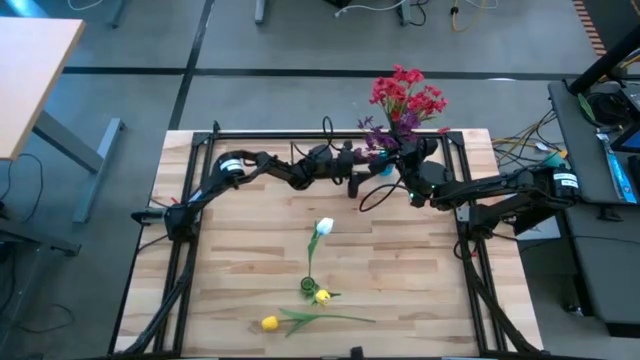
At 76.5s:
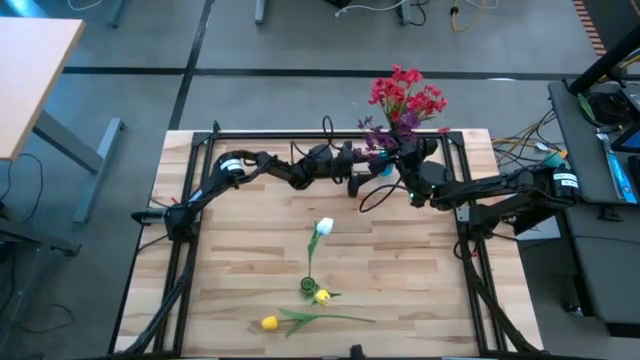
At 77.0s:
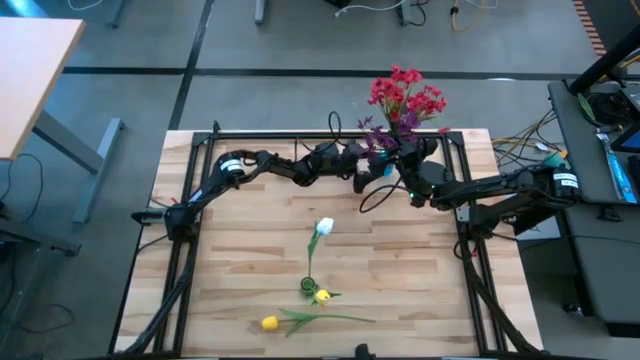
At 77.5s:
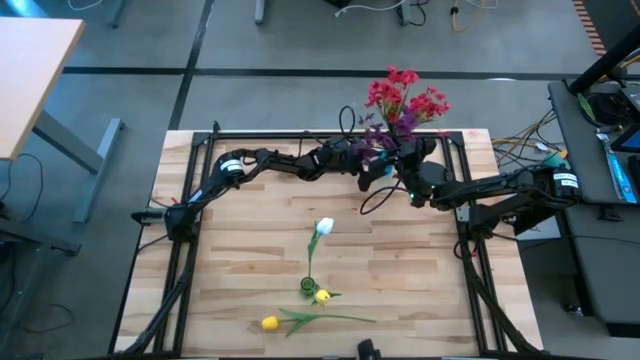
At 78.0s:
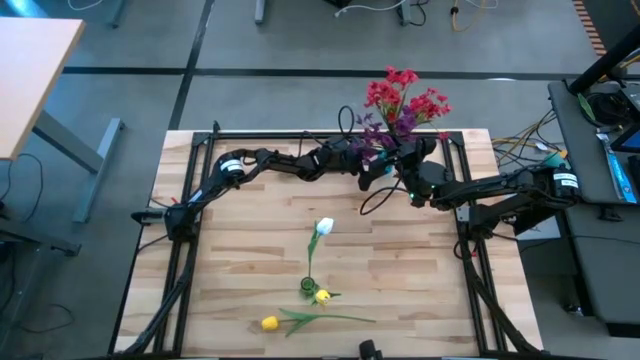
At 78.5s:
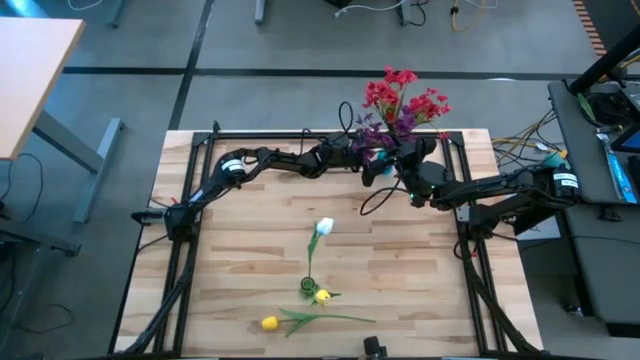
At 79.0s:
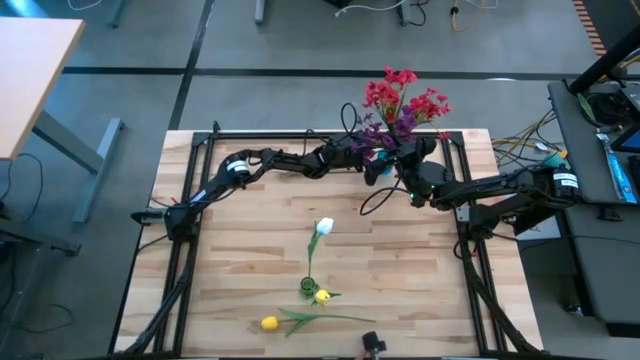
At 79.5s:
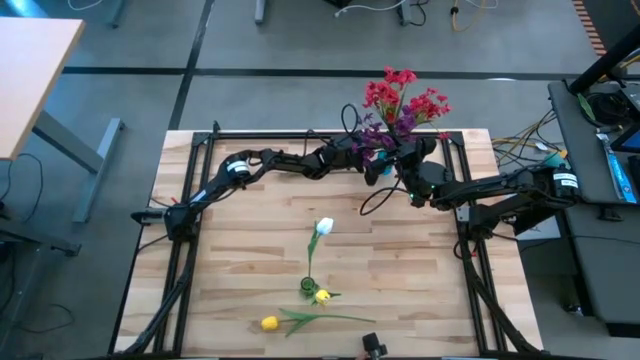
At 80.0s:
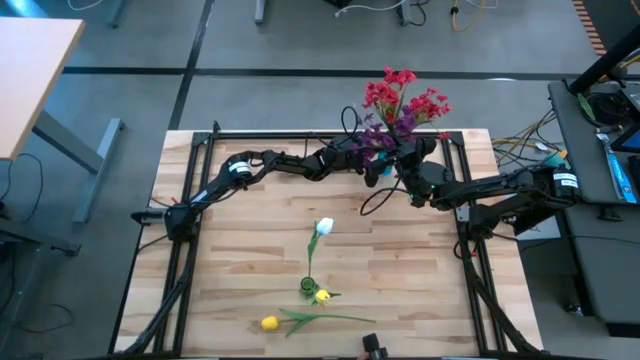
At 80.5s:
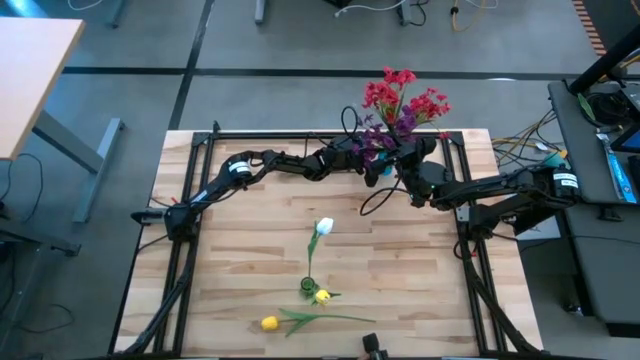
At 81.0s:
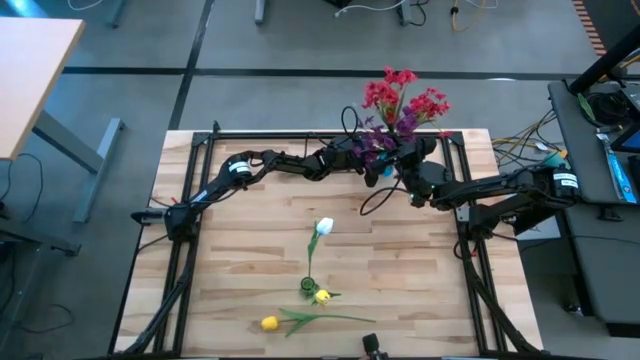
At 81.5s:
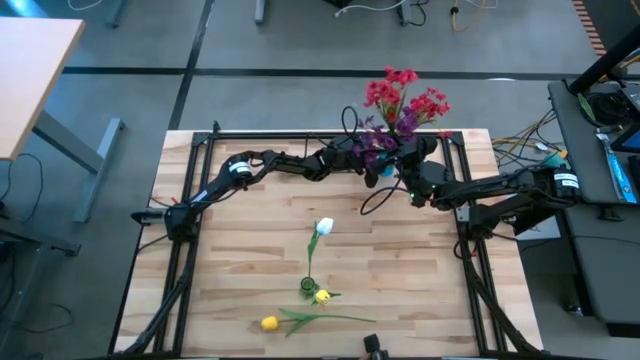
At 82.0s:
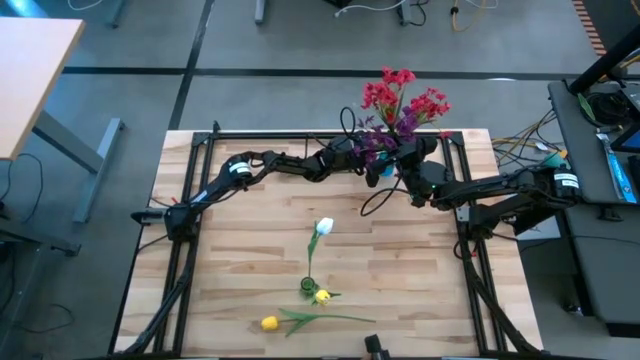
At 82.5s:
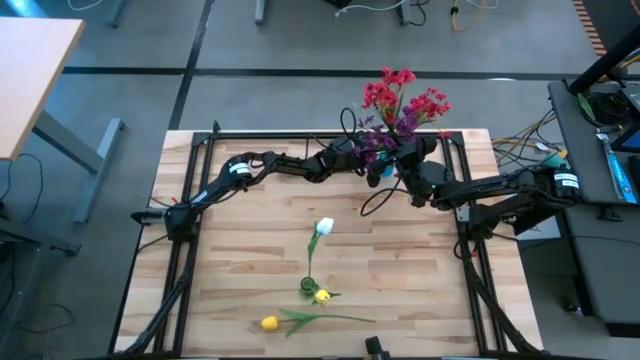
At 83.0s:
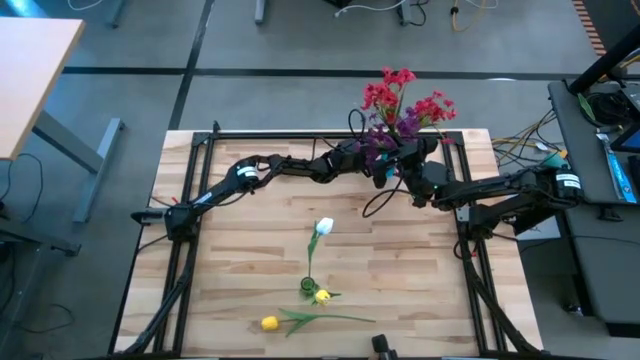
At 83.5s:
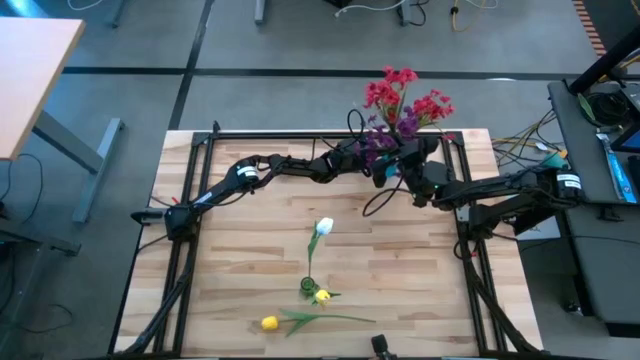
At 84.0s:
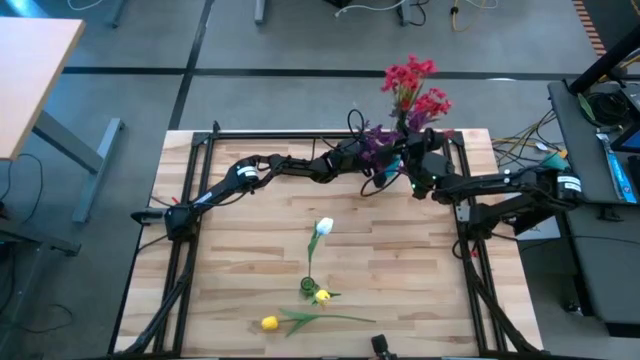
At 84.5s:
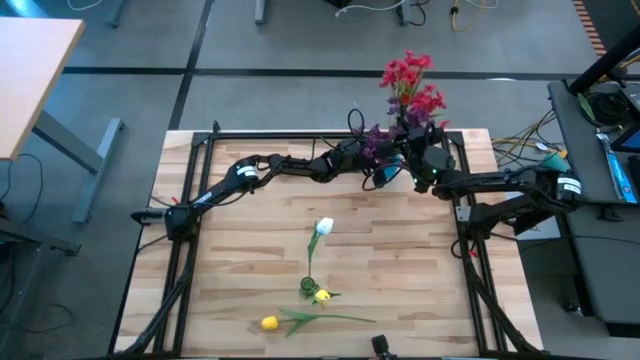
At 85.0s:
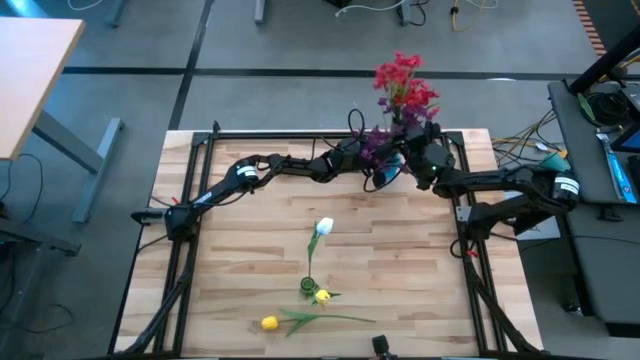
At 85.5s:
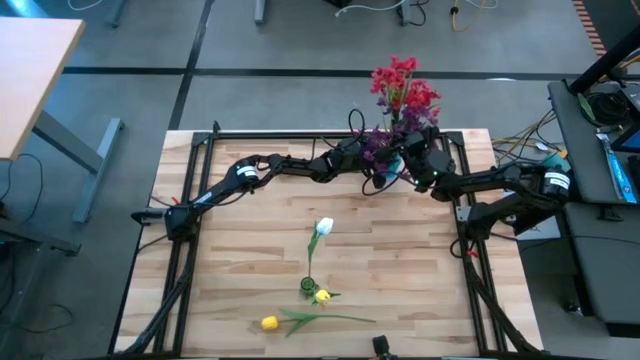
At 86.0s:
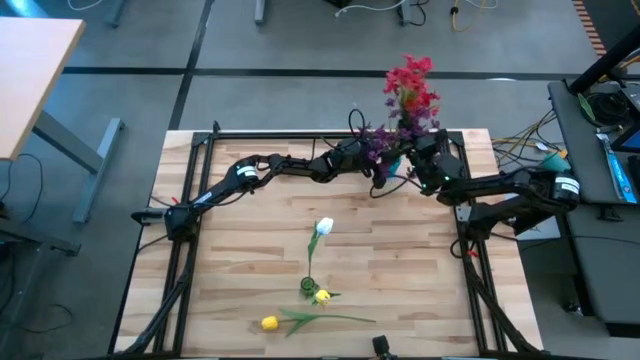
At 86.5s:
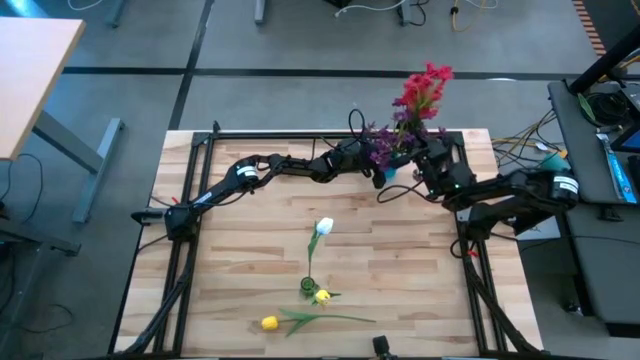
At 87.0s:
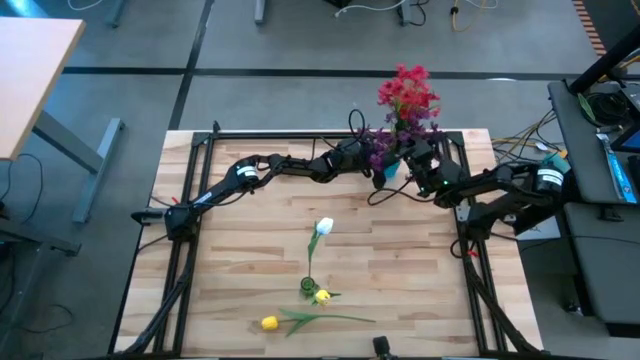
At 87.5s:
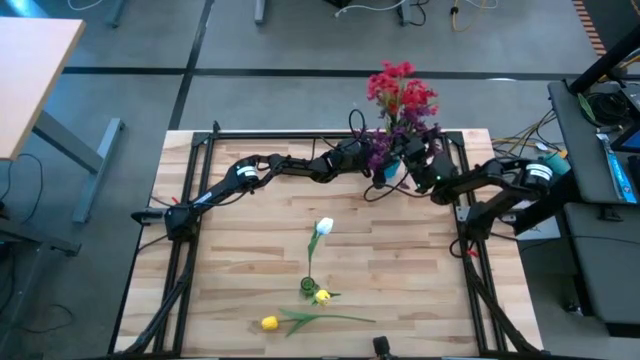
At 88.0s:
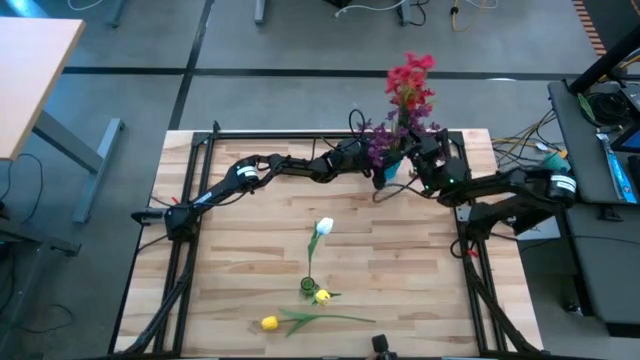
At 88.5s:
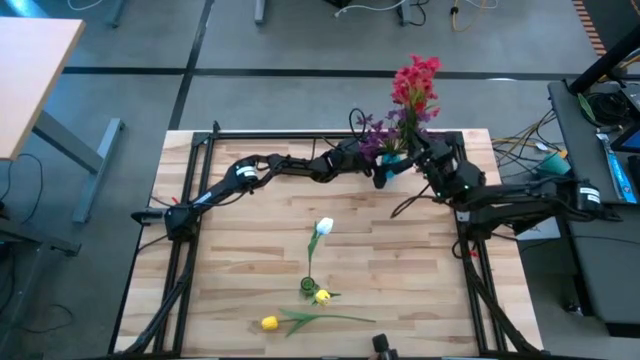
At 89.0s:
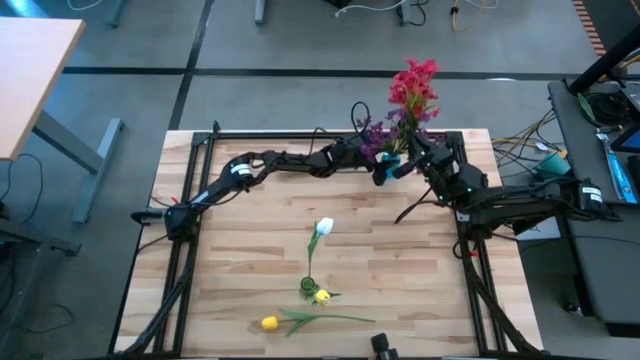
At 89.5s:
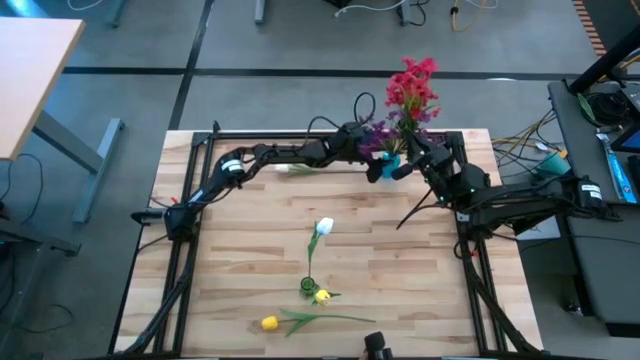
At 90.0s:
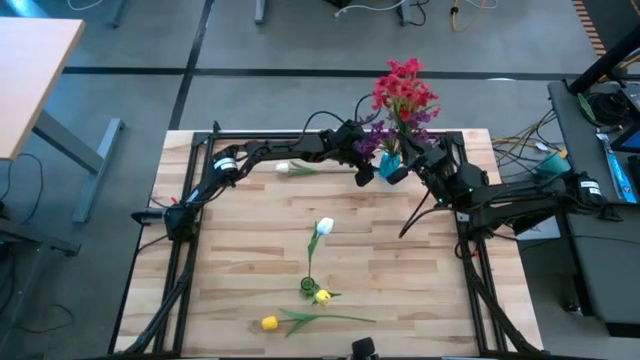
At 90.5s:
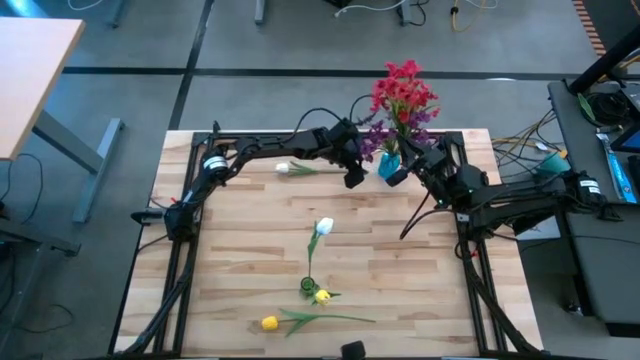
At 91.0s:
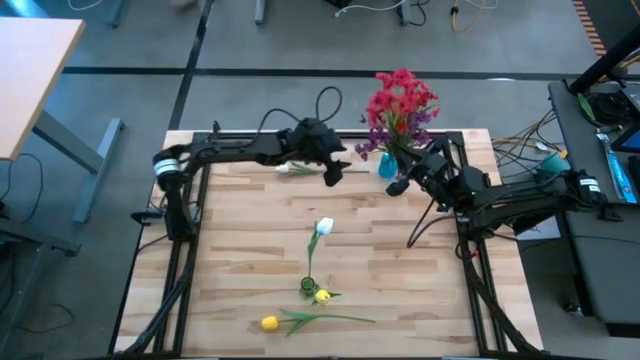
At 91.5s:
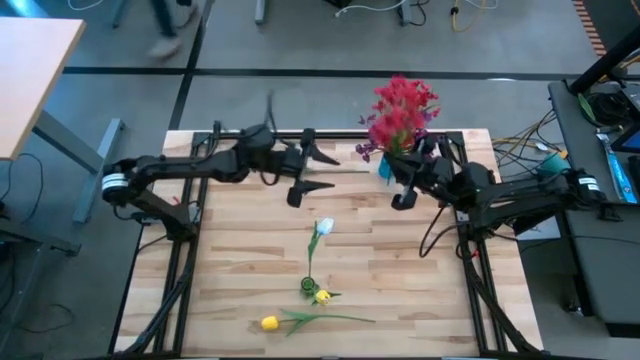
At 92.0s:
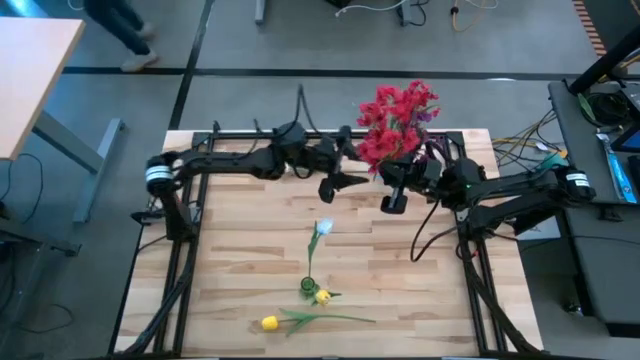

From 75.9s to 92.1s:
Task: Sort flowers into vase by color
Put the red flowers into the blue vase

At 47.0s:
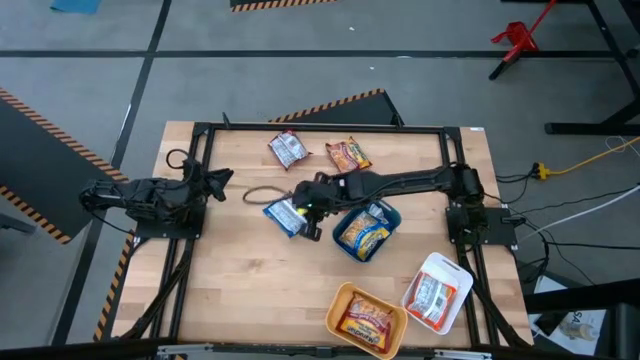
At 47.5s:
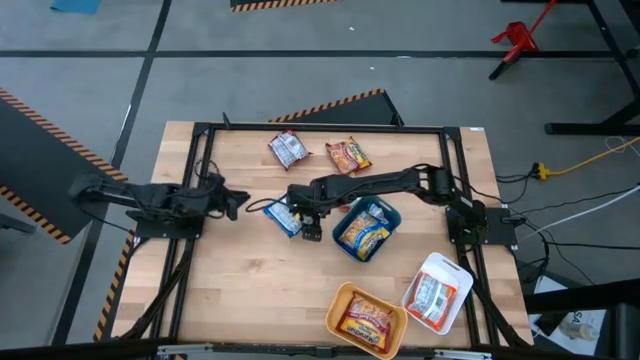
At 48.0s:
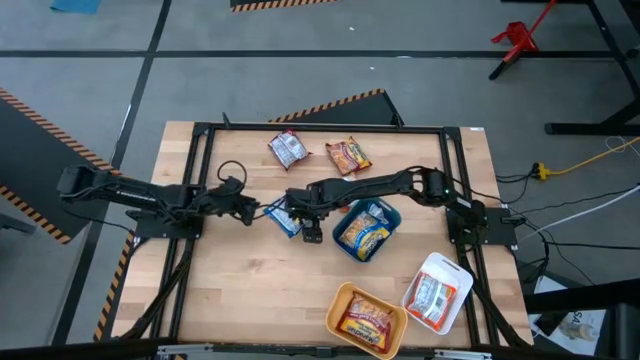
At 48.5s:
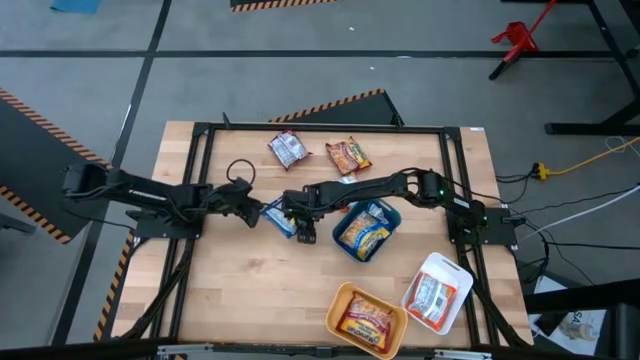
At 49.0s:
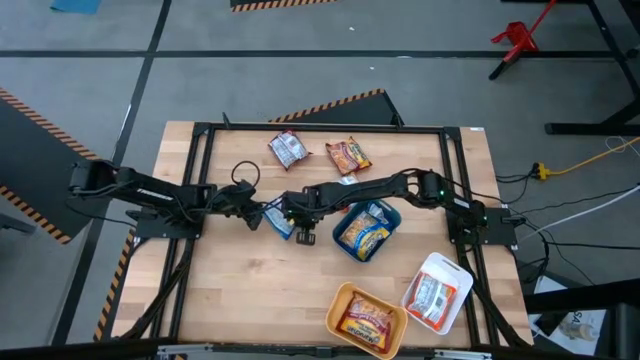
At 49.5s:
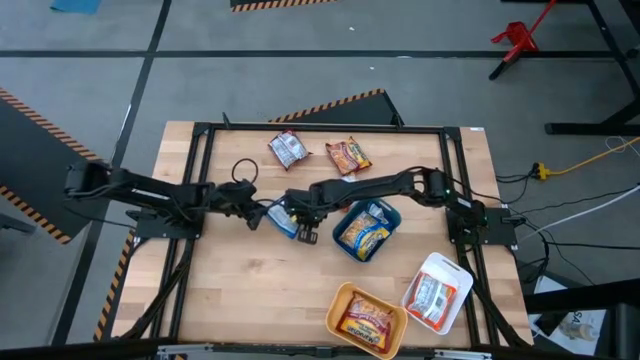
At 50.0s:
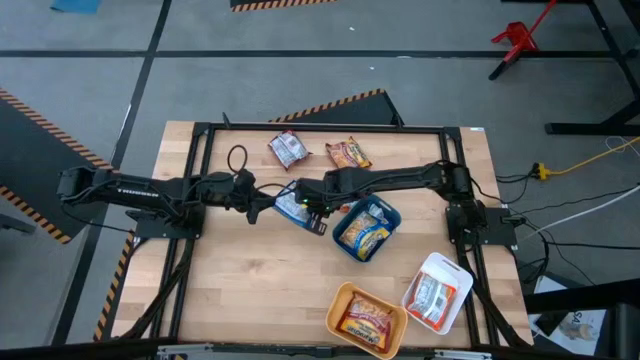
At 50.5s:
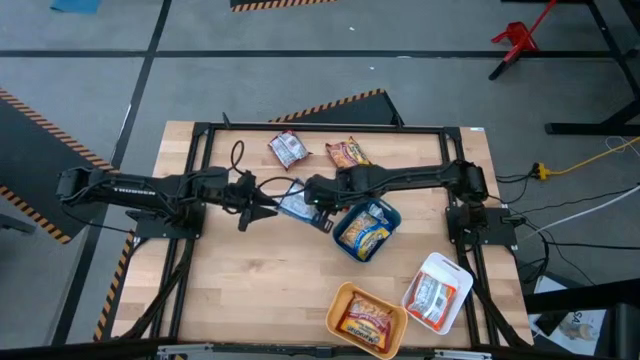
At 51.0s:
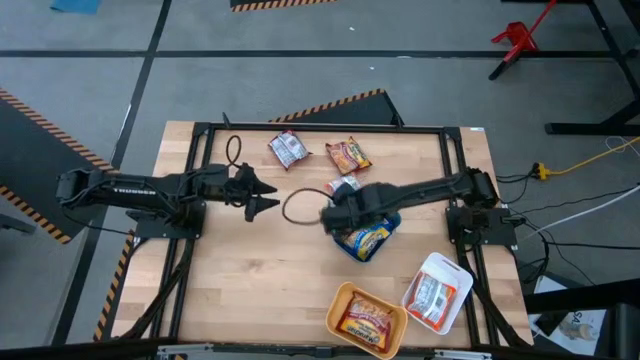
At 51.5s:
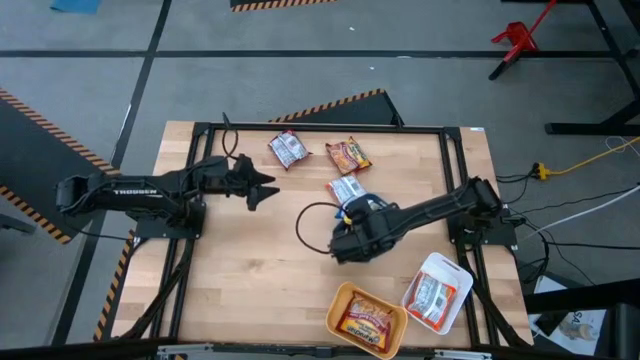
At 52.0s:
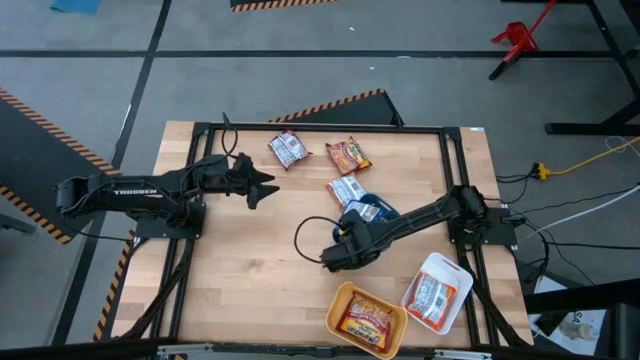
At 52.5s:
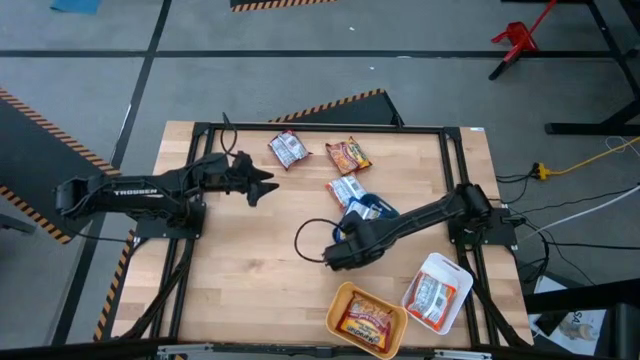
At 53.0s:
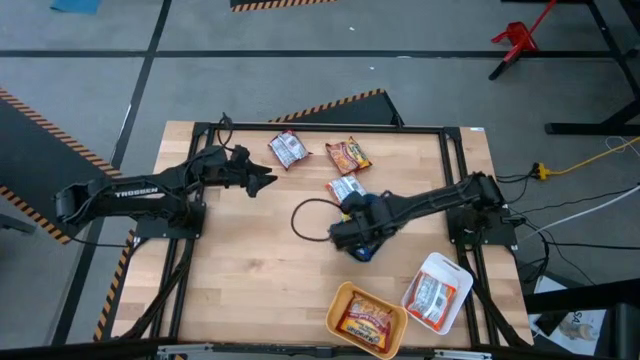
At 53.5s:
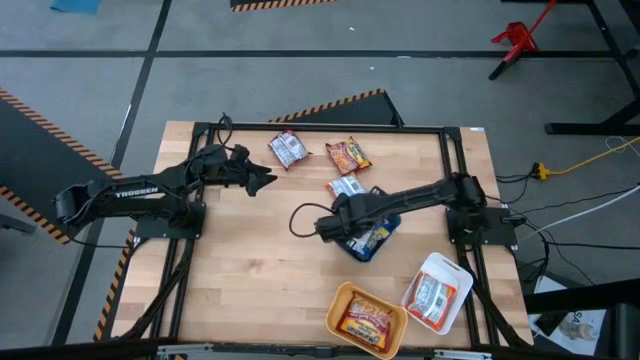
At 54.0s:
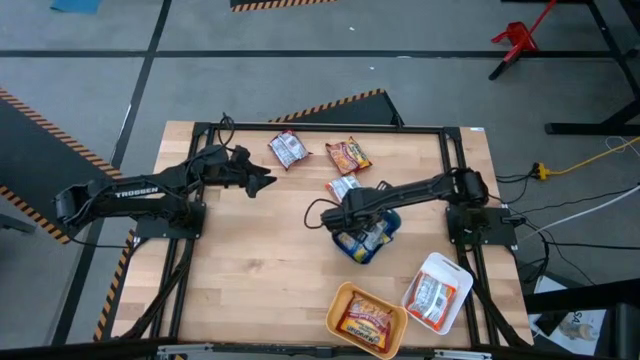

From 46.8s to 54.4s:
Task: Sort Maruchan noodles
Put the blue noodle pack into the green bin
